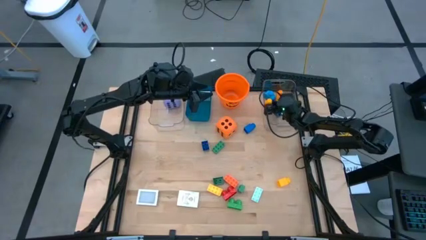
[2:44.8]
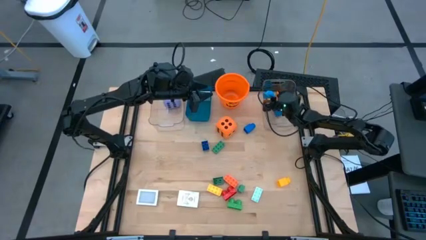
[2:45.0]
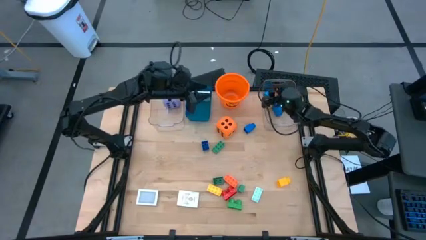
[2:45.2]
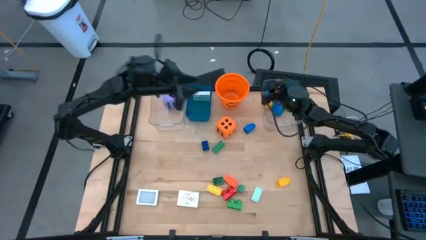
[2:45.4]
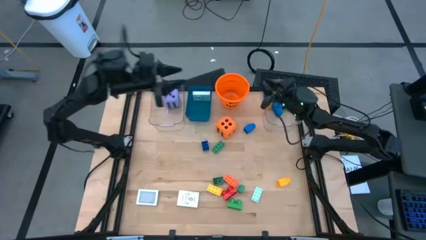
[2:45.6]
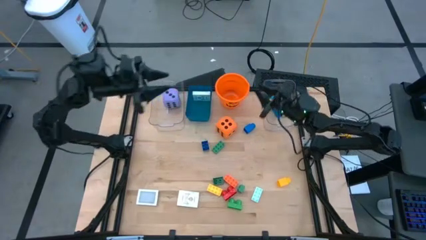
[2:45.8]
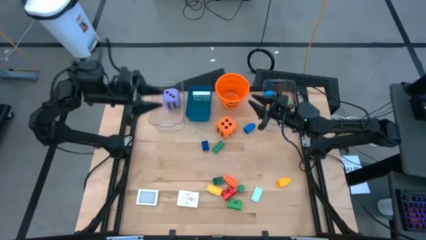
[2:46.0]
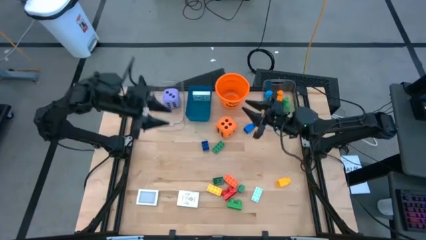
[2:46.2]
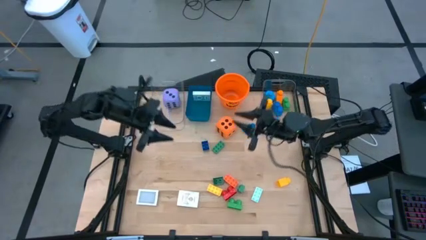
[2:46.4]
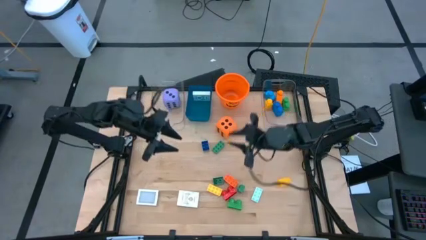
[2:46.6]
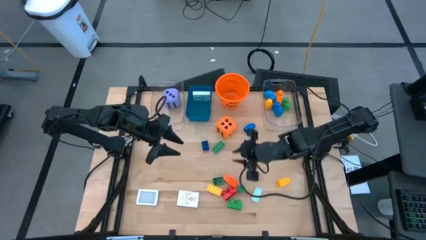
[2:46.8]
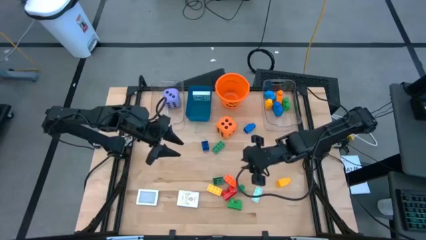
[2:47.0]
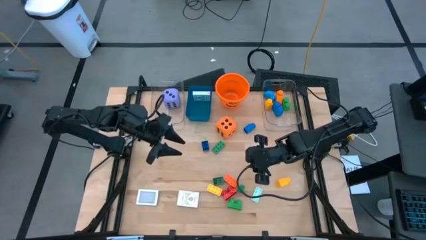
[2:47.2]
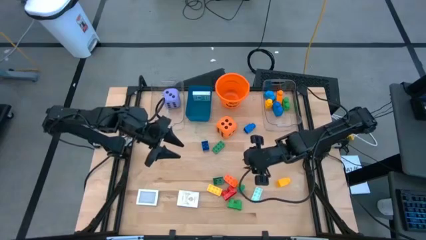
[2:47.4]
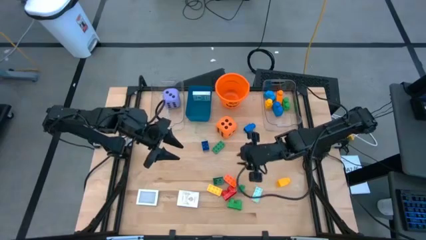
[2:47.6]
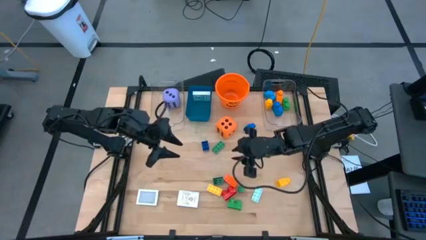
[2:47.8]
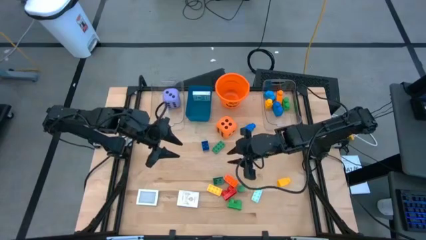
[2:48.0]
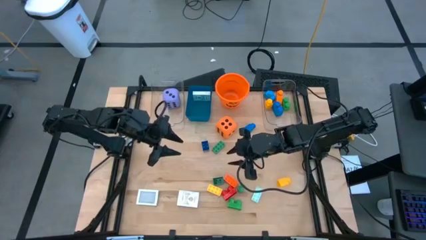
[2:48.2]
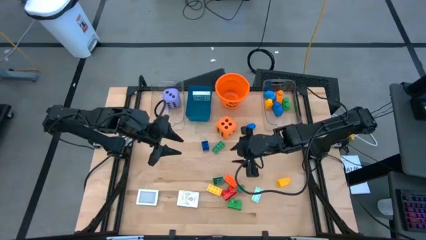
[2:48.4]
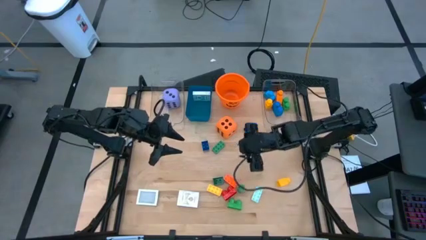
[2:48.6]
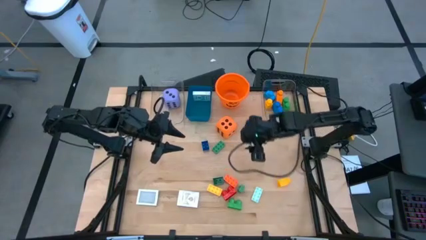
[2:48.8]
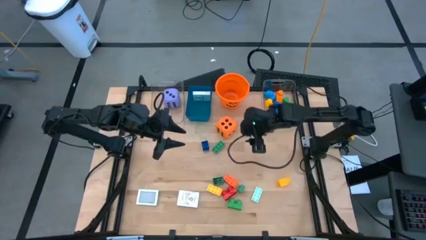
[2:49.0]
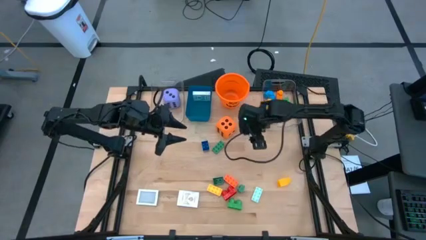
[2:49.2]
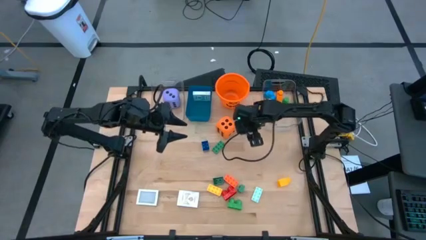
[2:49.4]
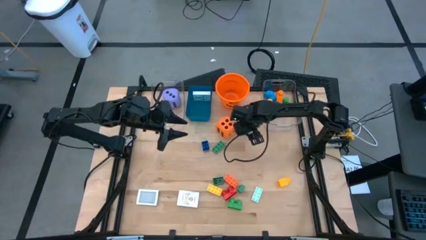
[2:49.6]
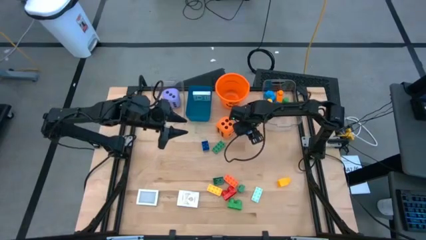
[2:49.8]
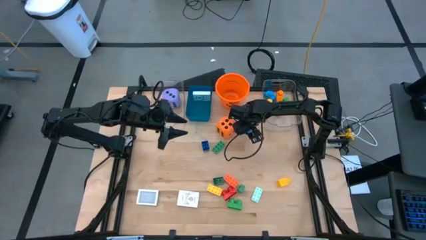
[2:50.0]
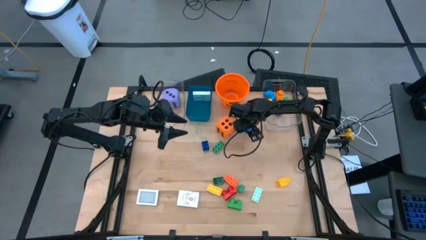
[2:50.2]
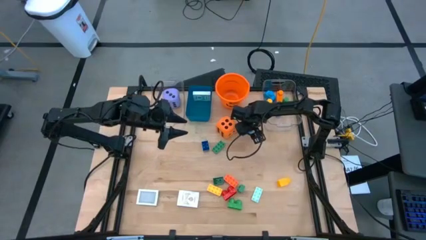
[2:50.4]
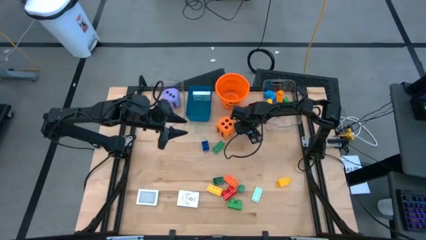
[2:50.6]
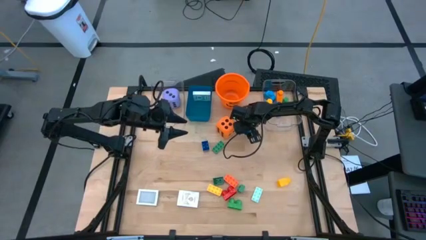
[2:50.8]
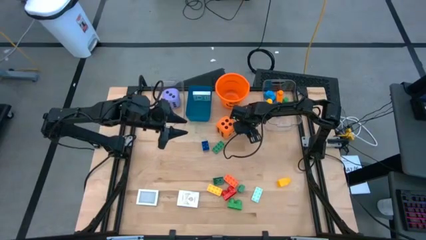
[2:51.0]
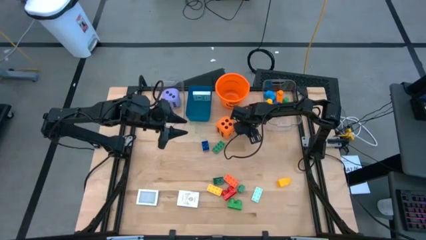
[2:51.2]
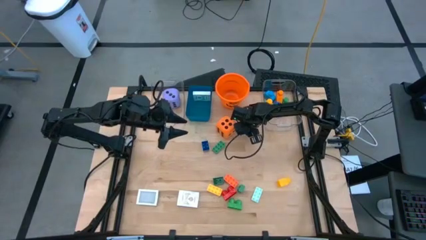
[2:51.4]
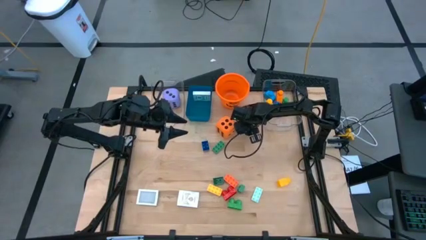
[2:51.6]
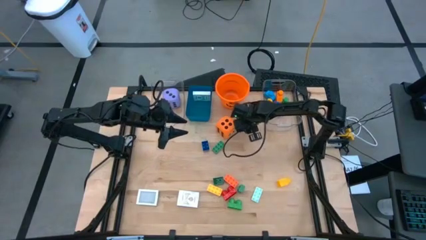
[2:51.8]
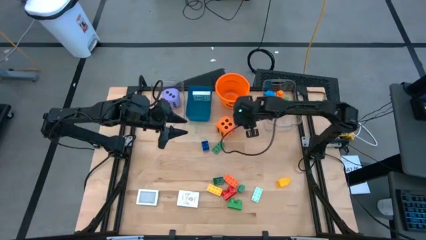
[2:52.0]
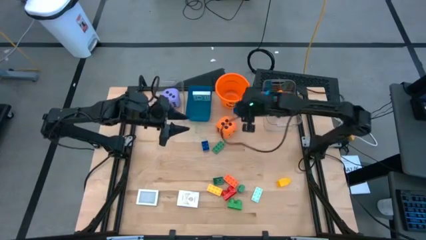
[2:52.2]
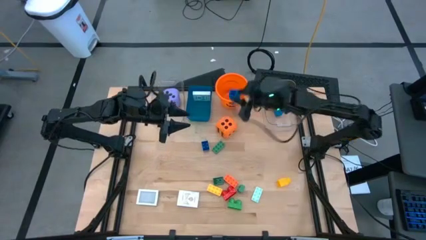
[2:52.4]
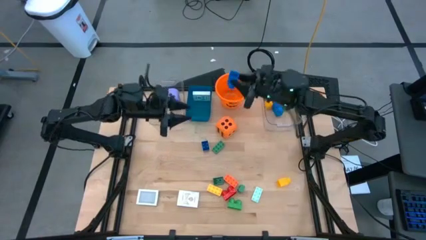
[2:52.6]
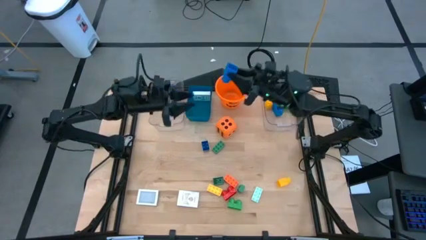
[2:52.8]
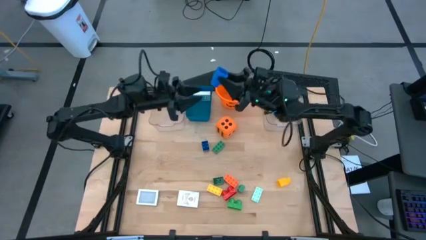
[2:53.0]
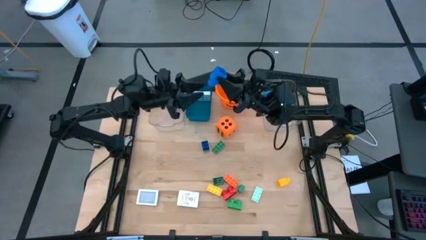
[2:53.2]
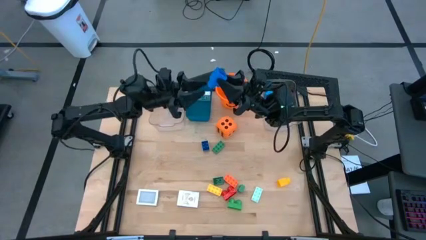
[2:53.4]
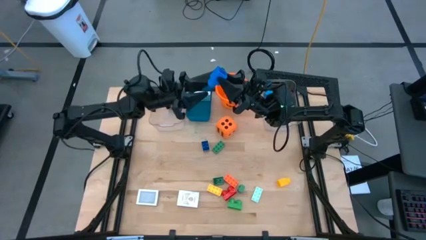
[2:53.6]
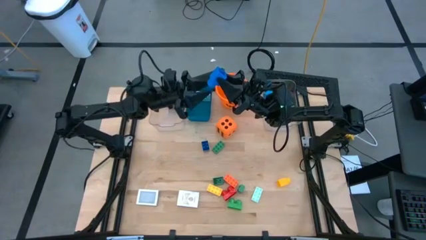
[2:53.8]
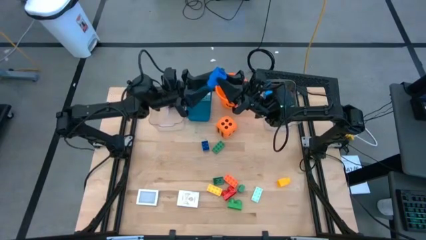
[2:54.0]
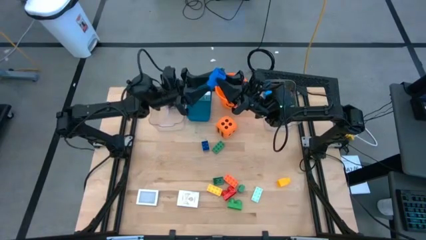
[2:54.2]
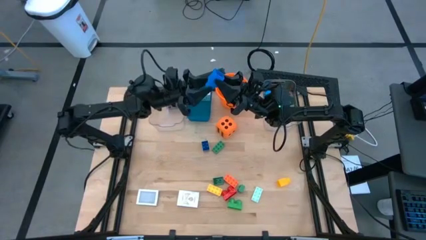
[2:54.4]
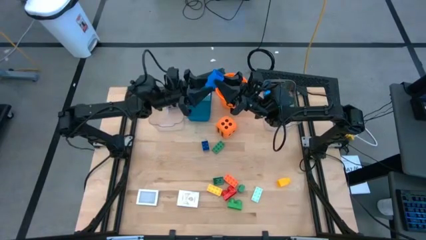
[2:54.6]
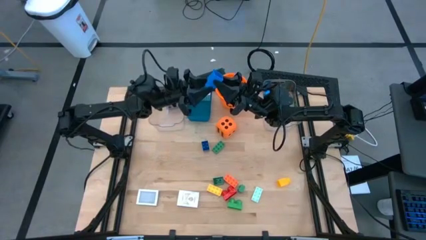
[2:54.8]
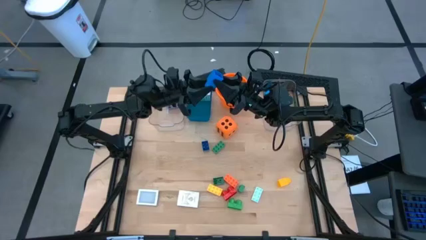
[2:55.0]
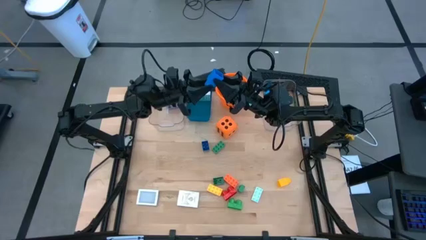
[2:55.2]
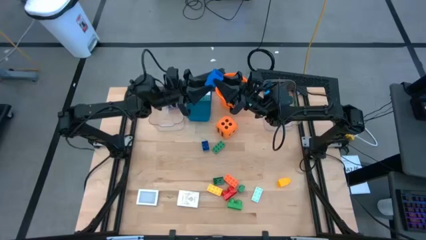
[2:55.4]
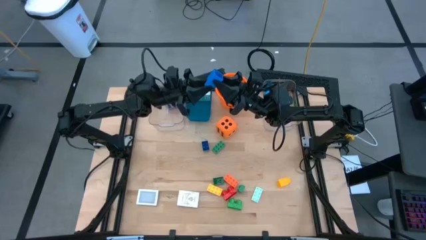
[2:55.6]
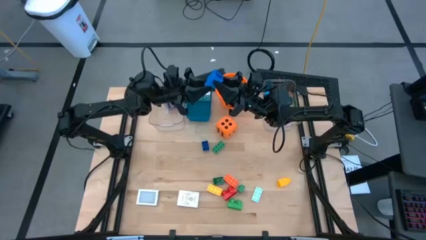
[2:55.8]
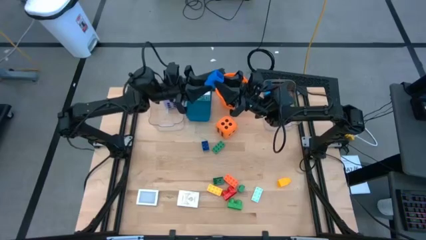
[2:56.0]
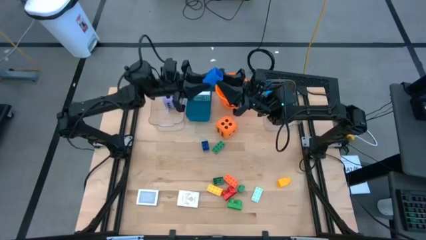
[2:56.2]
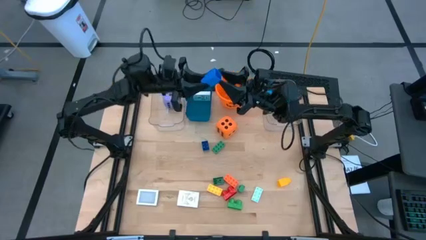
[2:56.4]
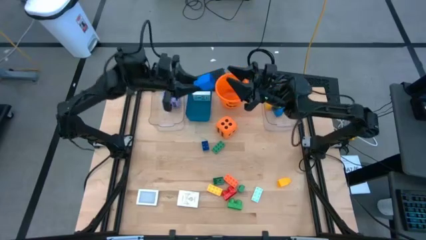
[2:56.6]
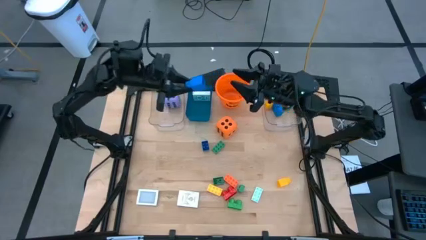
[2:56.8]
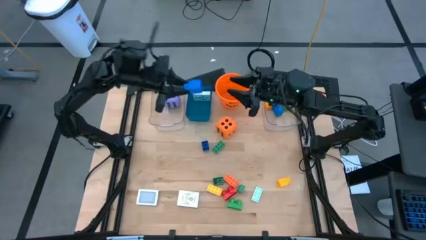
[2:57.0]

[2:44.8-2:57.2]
Task: Pick & Place Toys
Put the blue game piece into the right transparent bin

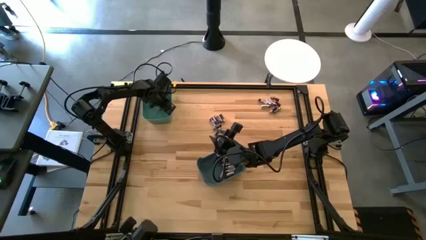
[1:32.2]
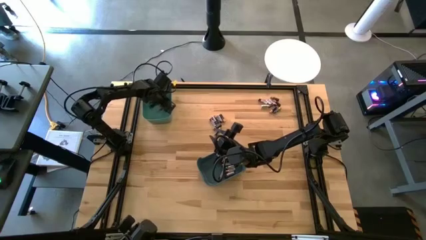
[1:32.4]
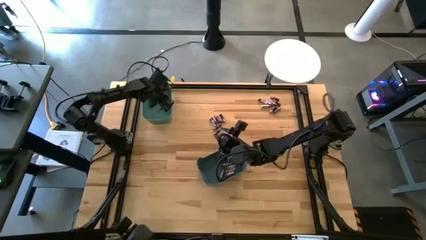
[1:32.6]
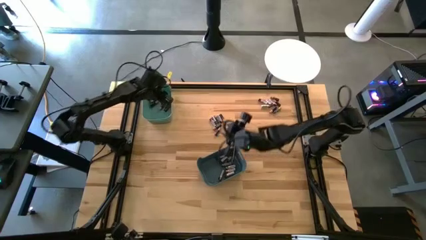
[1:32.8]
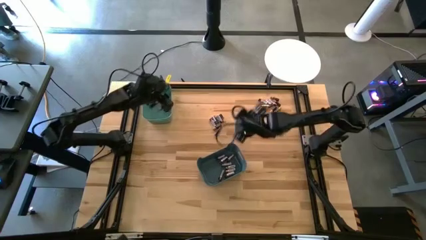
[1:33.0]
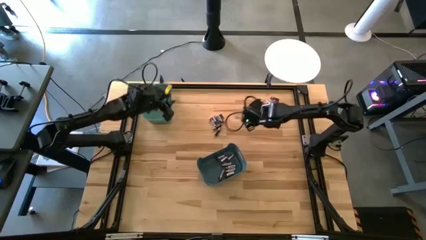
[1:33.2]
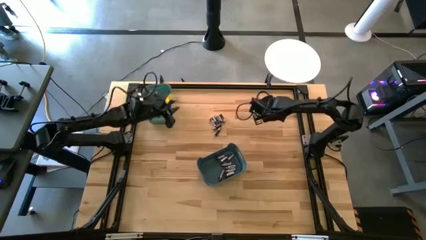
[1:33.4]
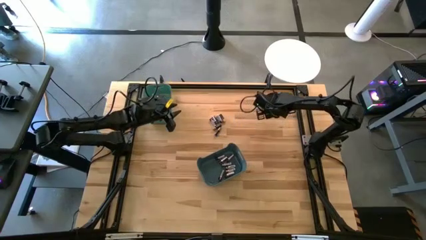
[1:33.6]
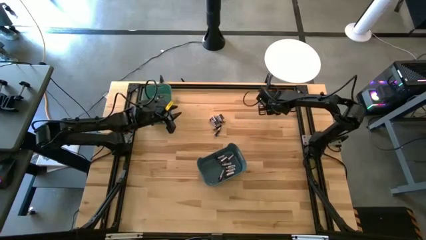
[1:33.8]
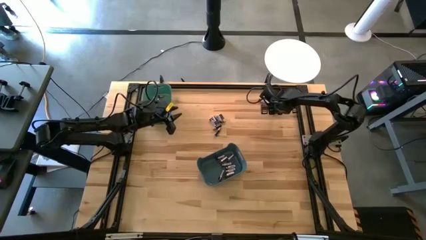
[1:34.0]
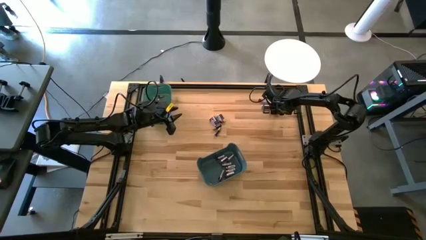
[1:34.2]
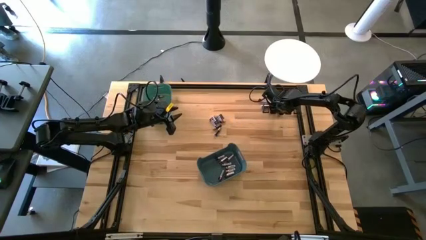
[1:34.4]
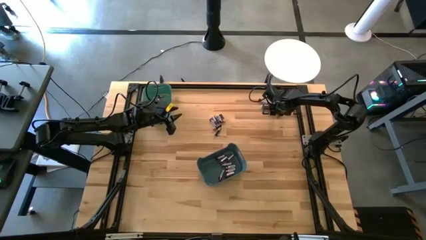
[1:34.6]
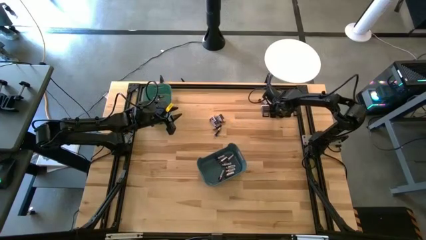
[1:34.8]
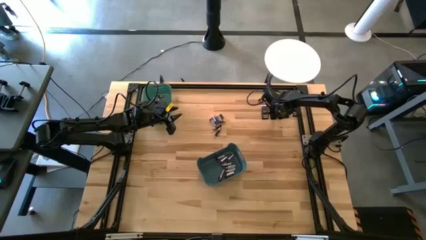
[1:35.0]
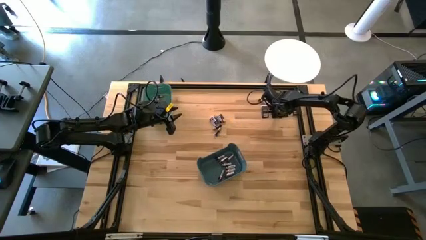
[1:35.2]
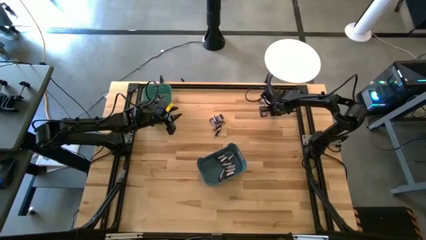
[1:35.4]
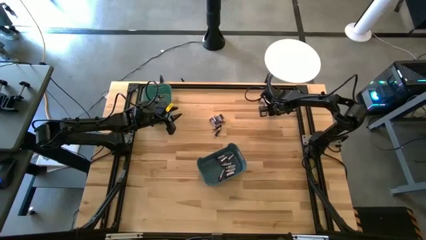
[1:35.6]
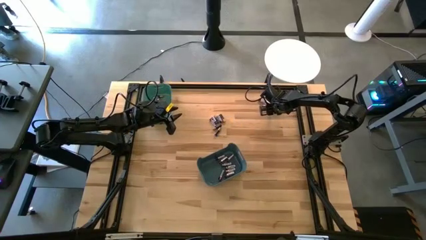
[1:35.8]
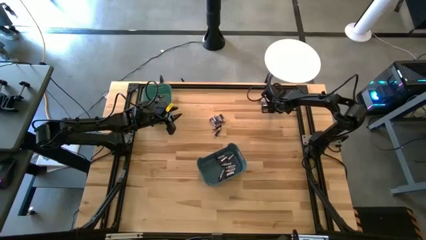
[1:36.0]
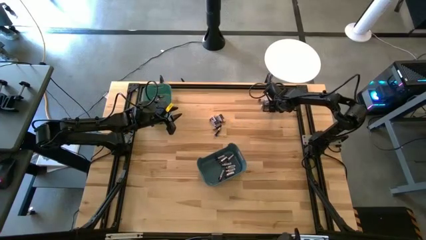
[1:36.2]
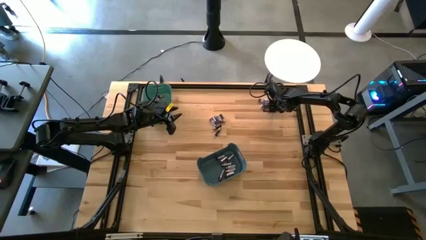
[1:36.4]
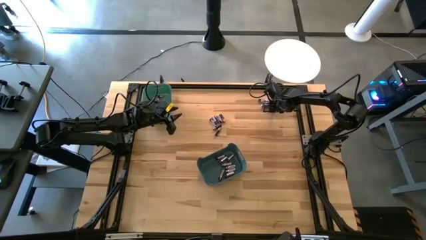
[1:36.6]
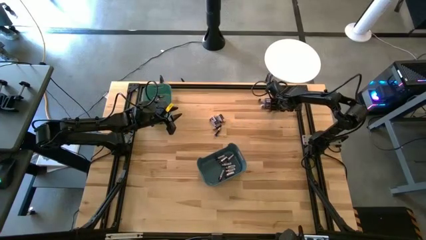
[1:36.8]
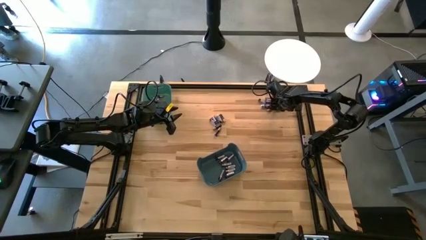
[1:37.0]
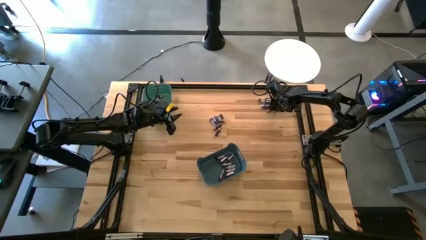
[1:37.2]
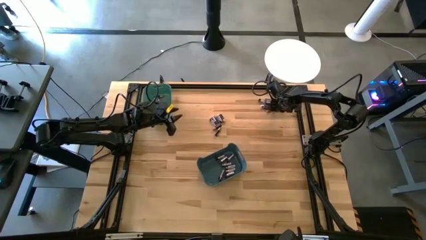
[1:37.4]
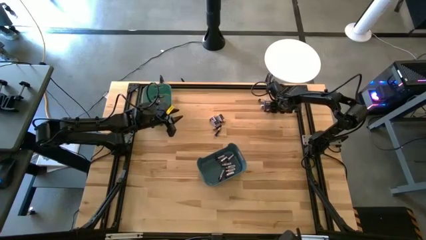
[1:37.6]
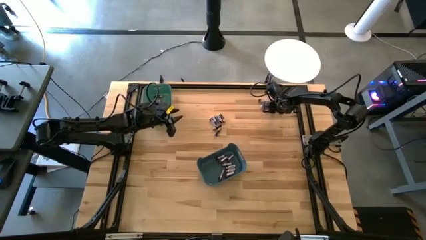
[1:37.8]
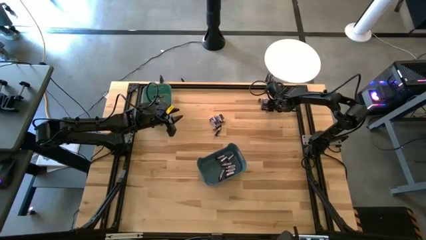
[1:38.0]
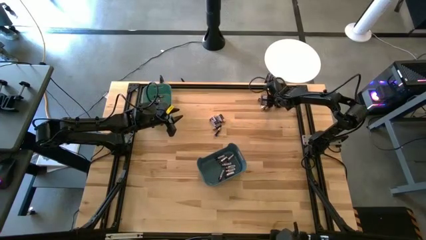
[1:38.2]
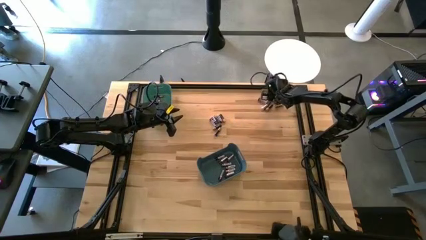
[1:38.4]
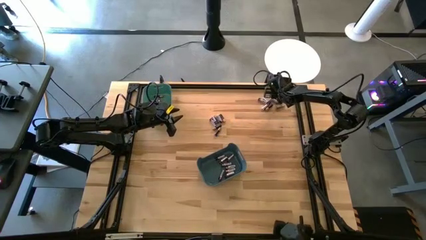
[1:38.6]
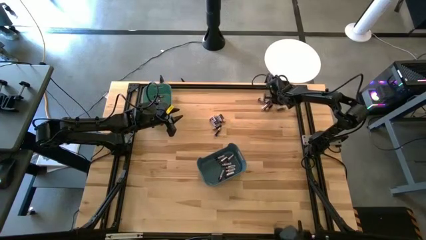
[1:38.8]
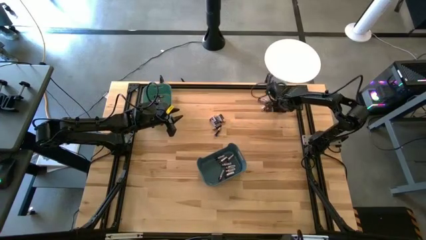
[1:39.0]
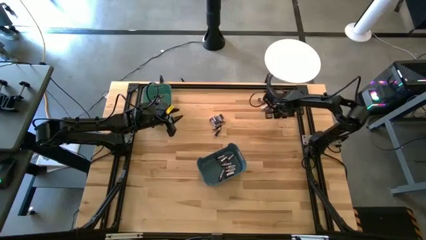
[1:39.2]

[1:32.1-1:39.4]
Task: Sort batteries
Put the black battery into the green bin
